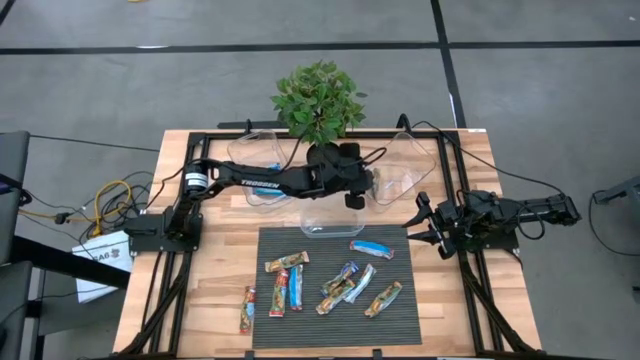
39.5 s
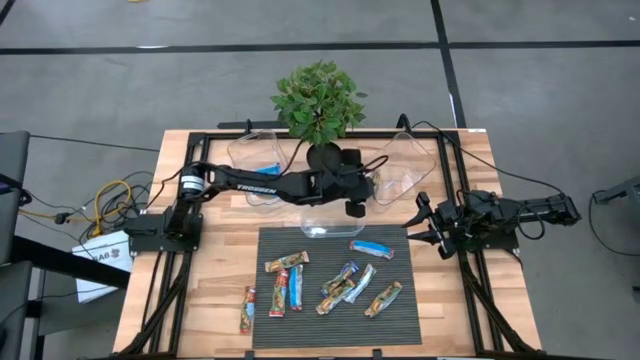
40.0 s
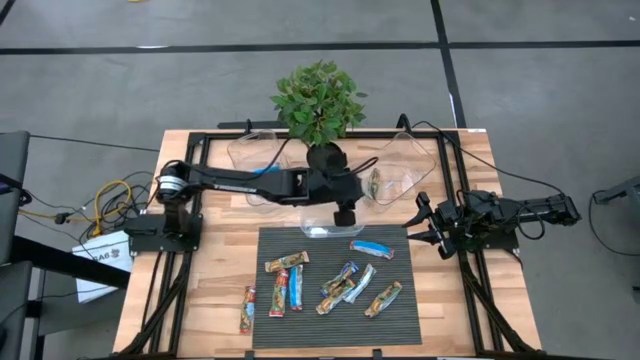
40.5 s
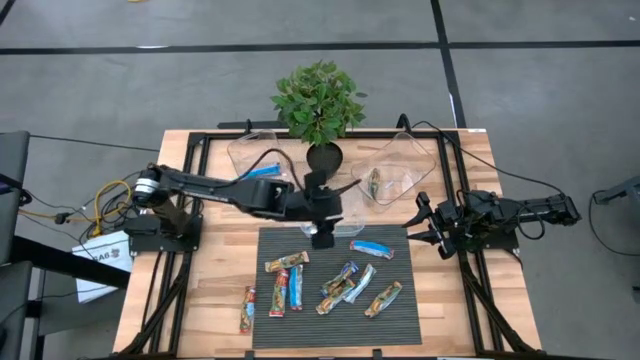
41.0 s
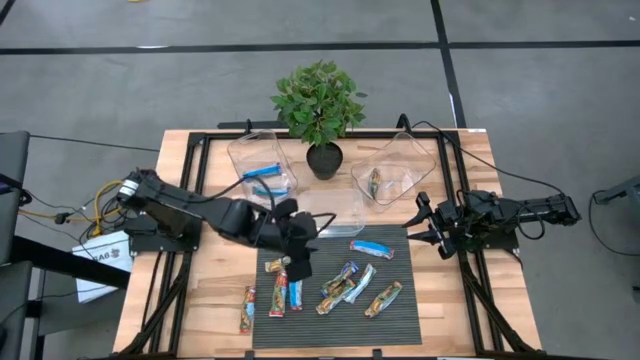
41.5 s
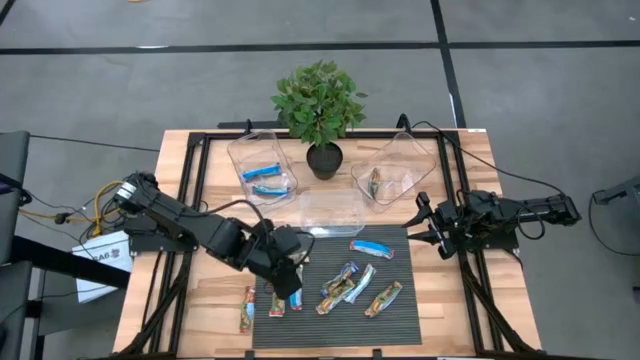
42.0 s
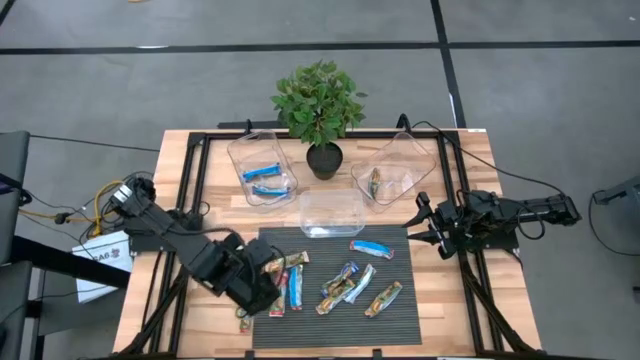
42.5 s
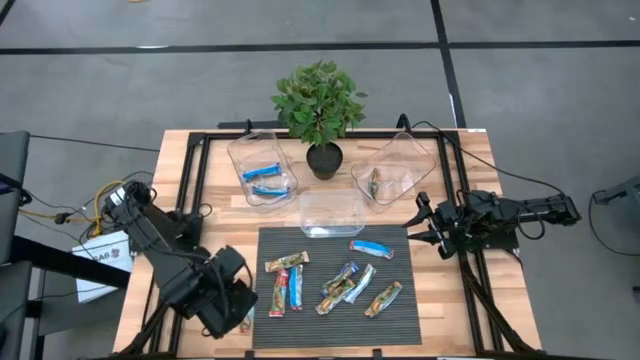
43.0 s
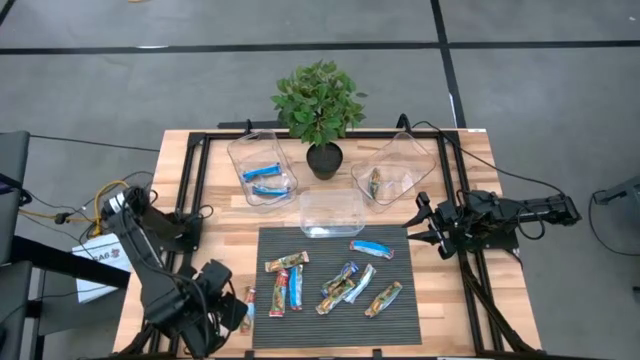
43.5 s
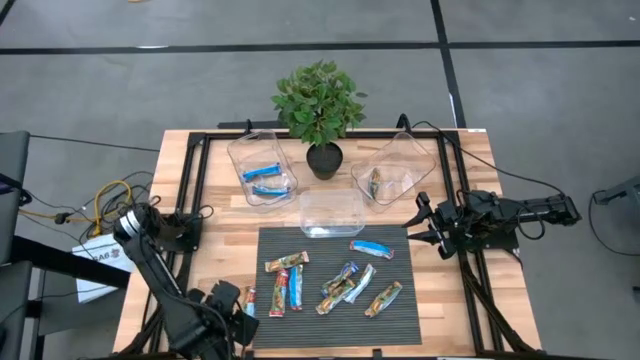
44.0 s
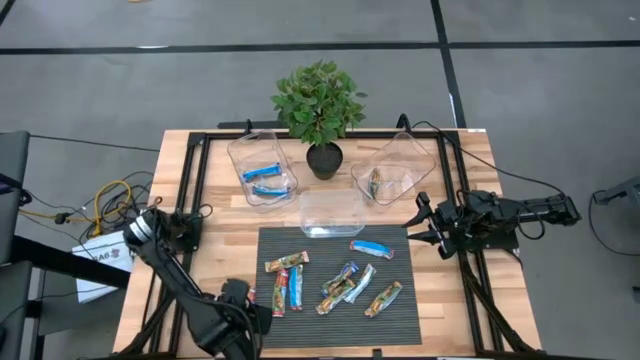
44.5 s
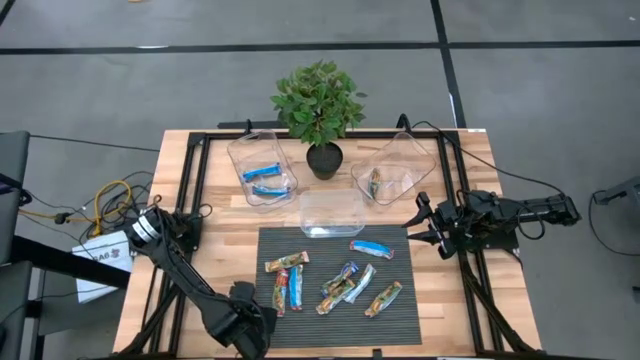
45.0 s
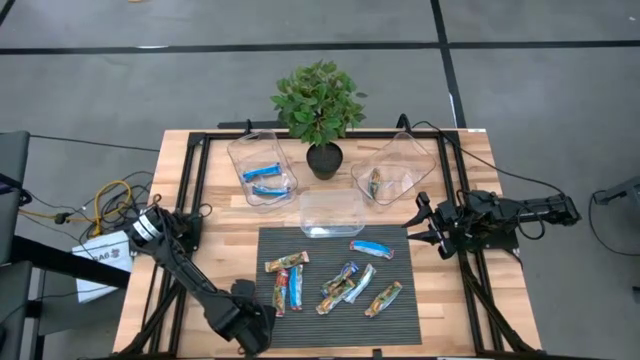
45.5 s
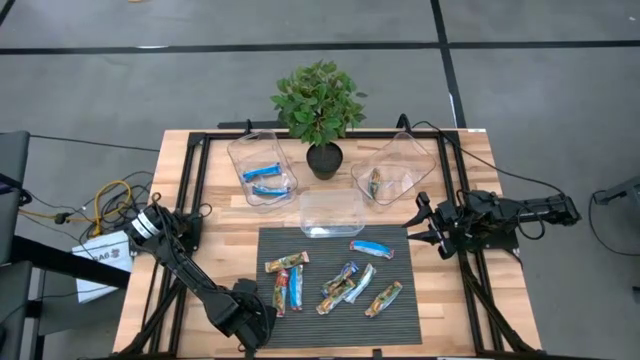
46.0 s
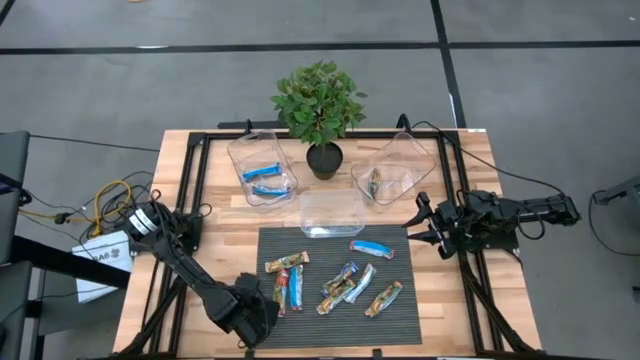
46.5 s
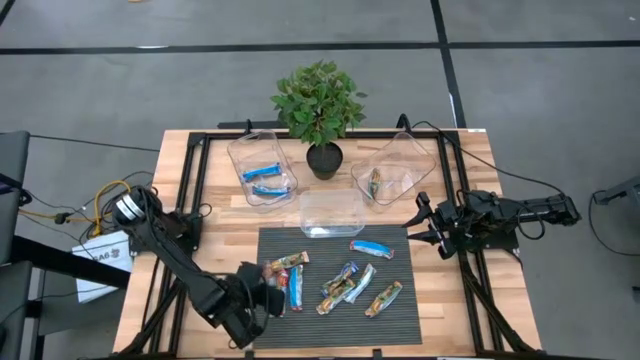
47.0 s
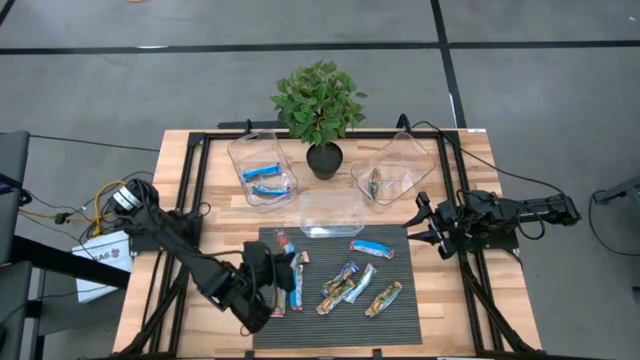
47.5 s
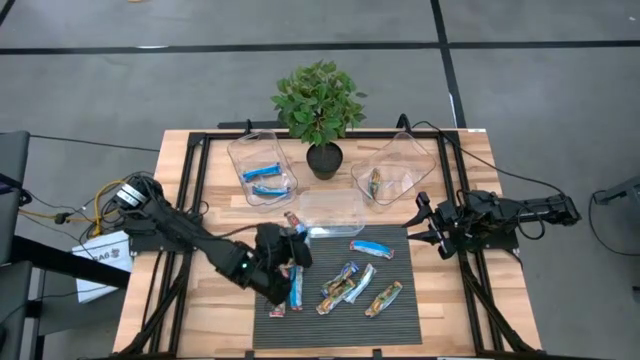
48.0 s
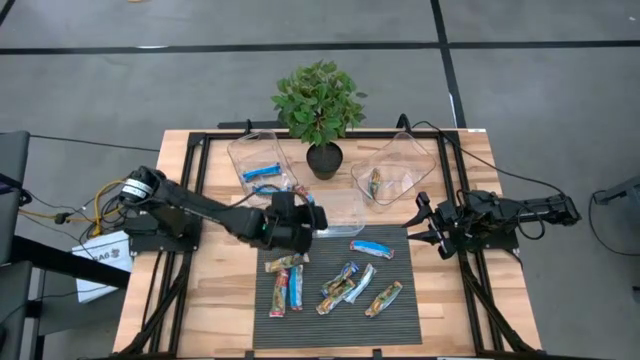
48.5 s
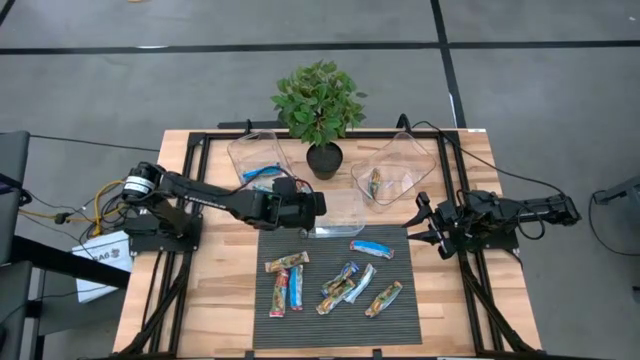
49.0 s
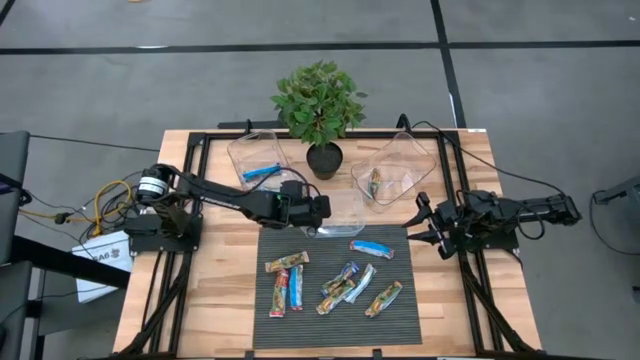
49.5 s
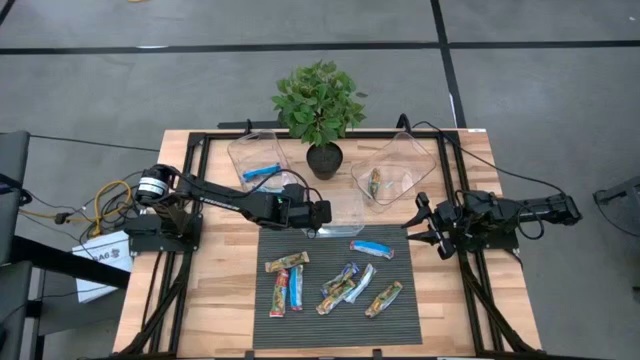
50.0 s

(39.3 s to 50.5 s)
Task: Pick and place Granola Bars by type
Put the red granola bar into the center transparent bin

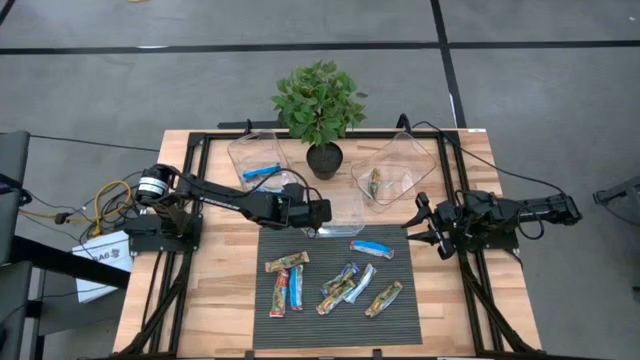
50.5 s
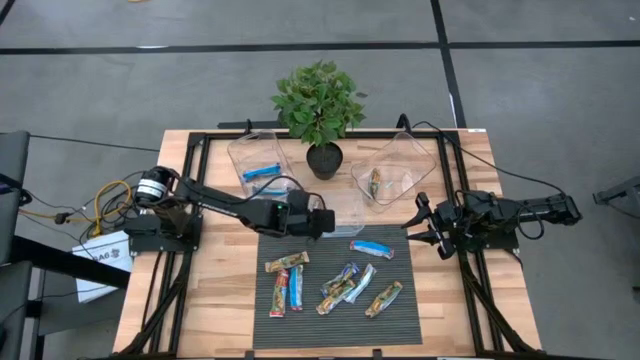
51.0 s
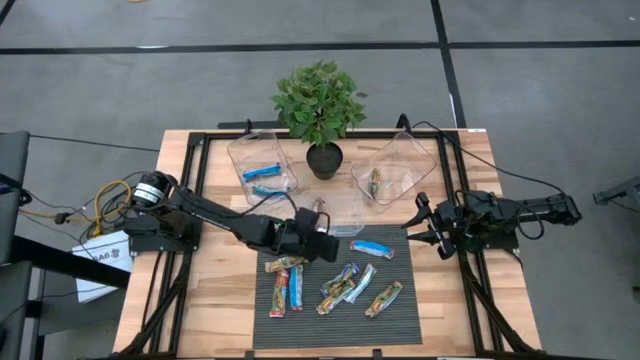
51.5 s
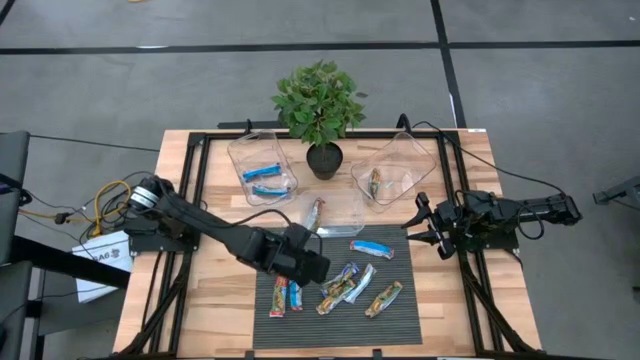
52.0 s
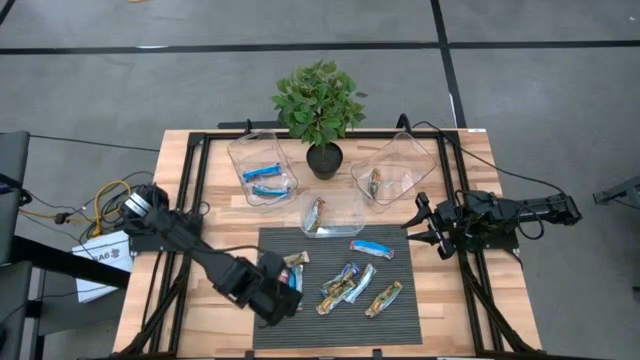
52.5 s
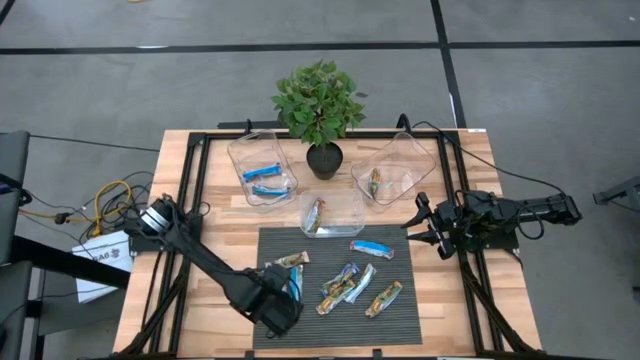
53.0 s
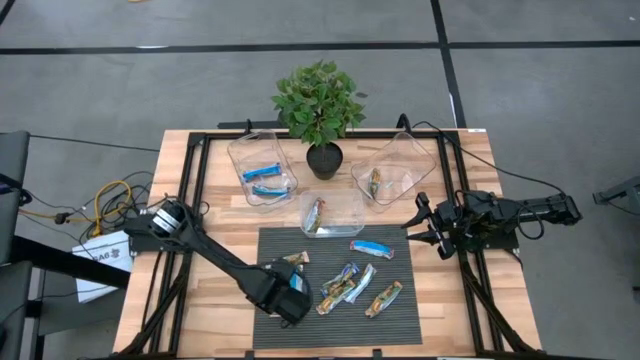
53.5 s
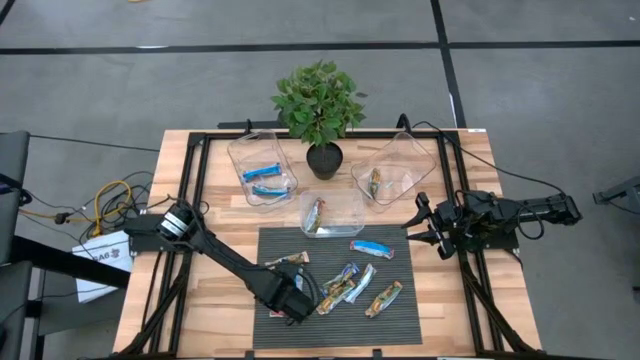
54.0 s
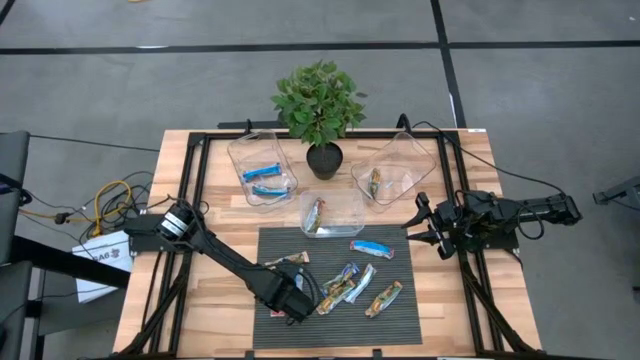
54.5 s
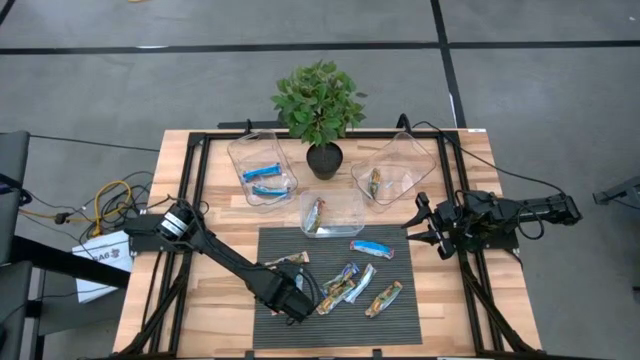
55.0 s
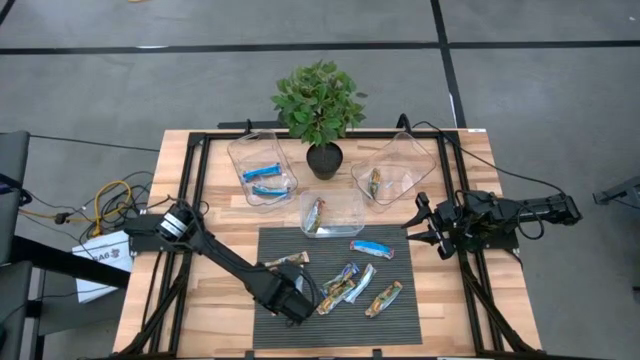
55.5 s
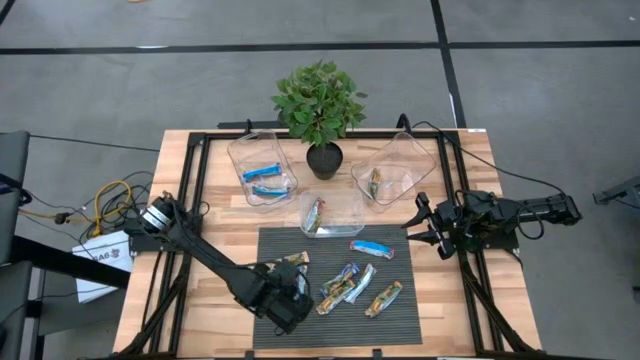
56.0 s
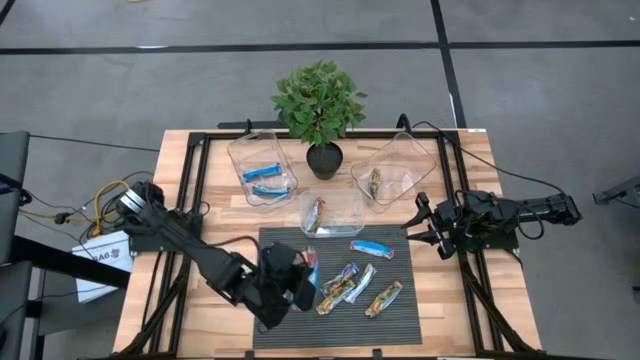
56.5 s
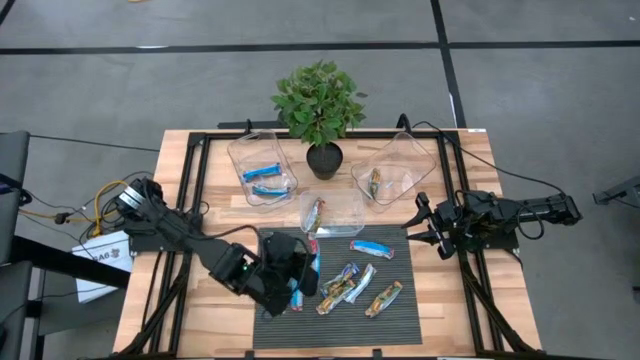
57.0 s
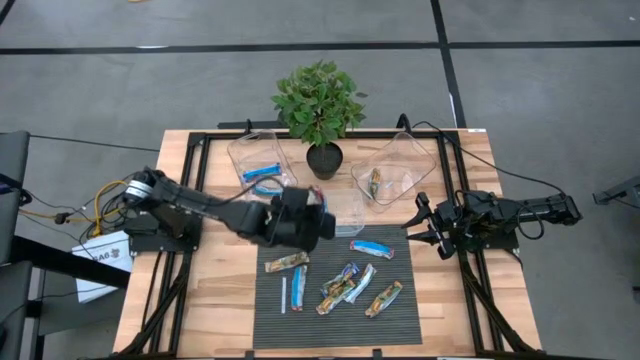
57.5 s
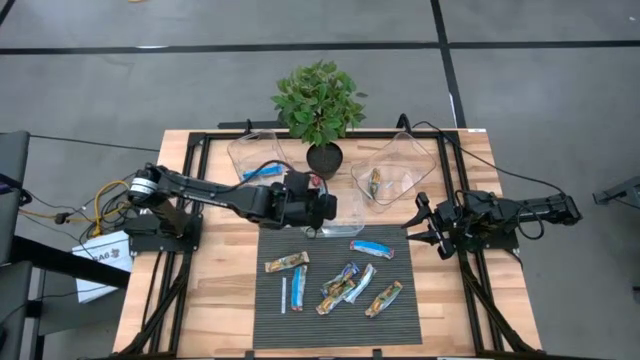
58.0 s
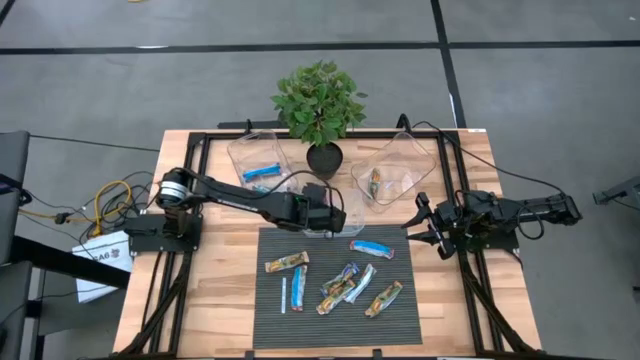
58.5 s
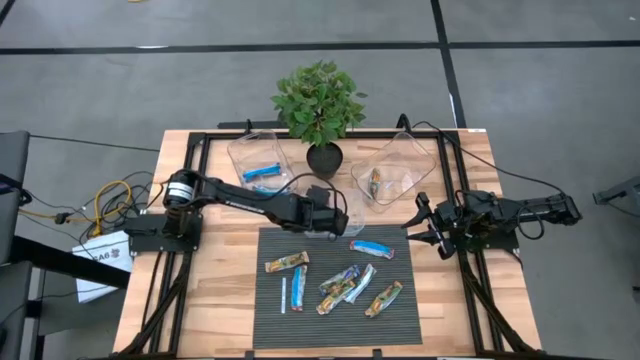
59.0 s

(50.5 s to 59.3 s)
Put the red granola bar into the center transparent bin

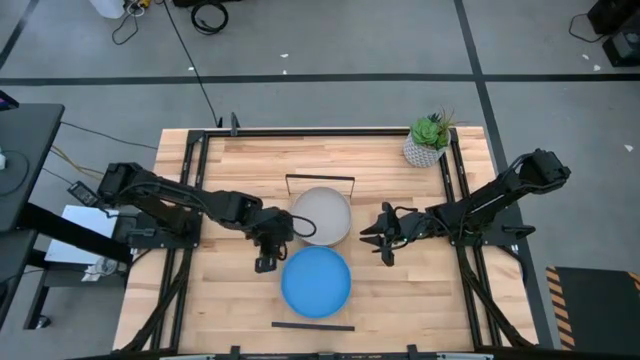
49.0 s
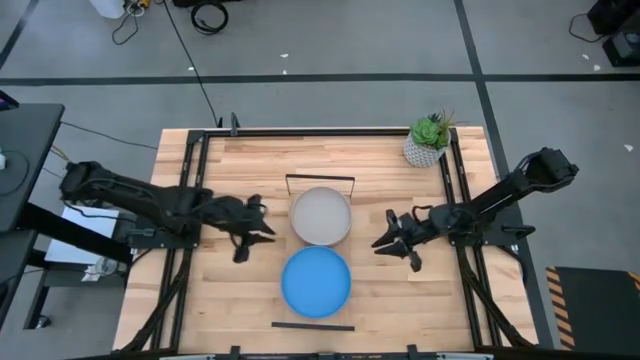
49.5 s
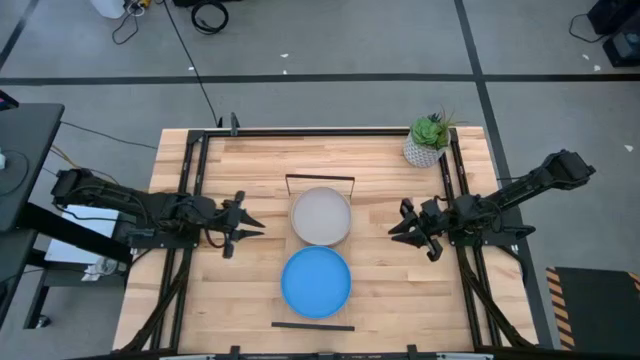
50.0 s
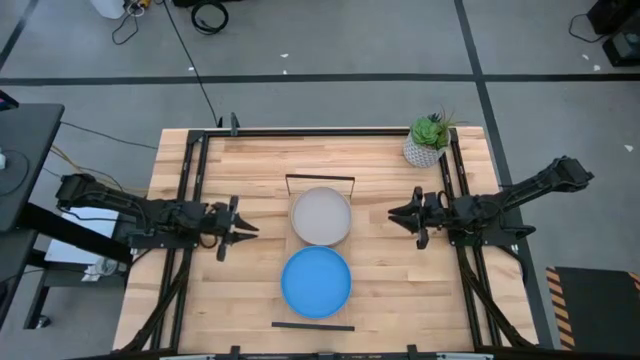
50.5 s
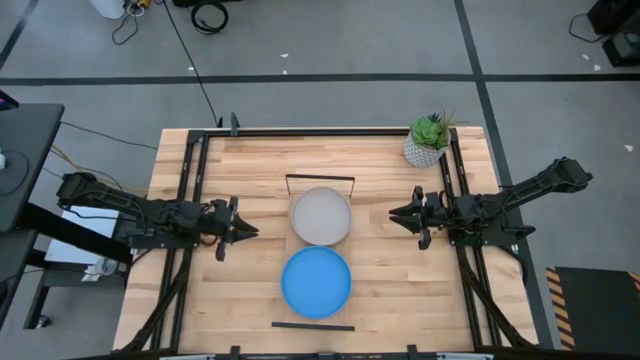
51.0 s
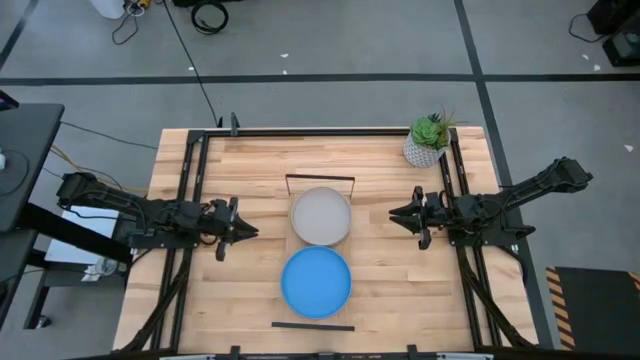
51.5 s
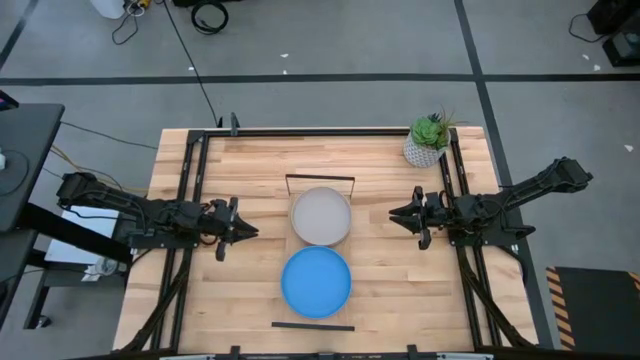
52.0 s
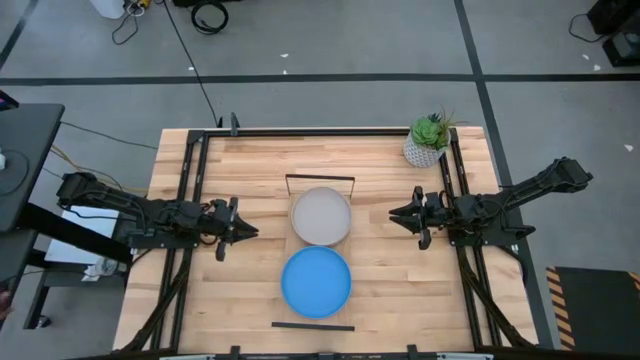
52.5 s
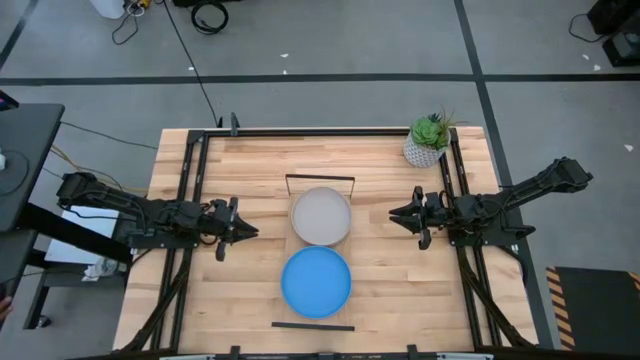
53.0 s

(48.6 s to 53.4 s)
Task: Place and stack plates onto a shelf
Return to Home Position
